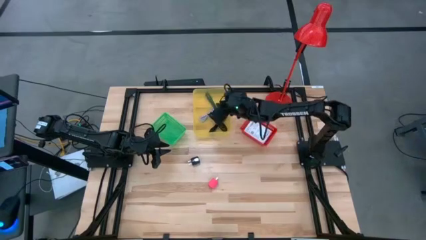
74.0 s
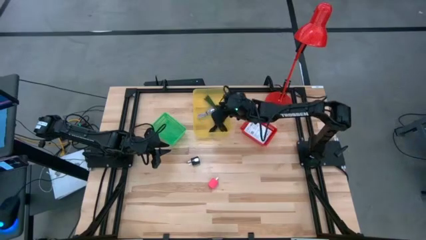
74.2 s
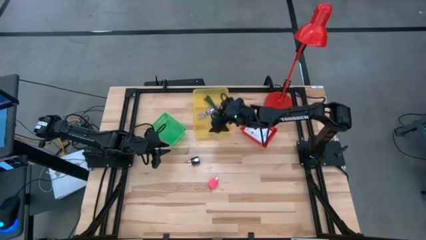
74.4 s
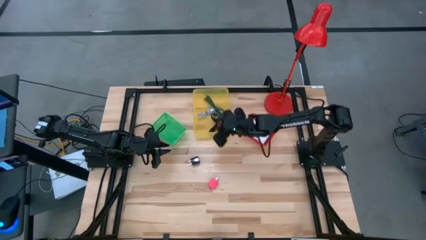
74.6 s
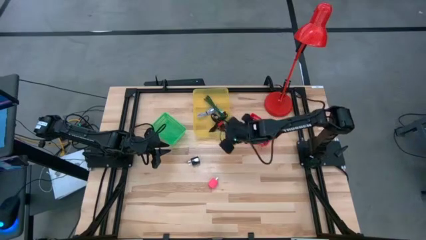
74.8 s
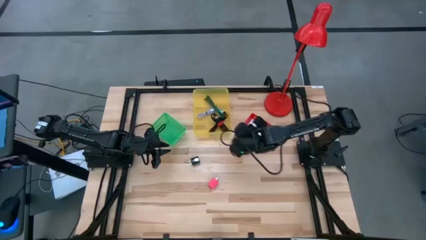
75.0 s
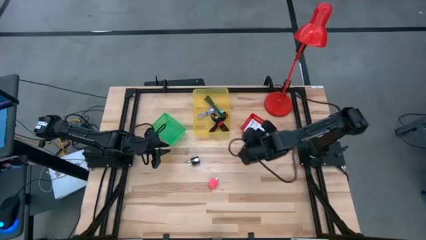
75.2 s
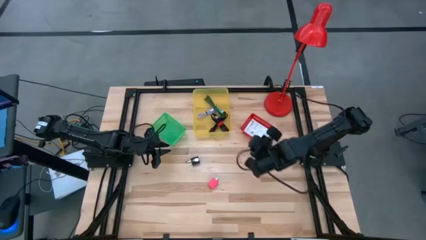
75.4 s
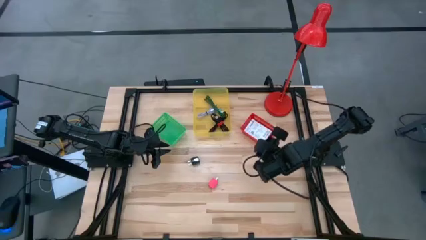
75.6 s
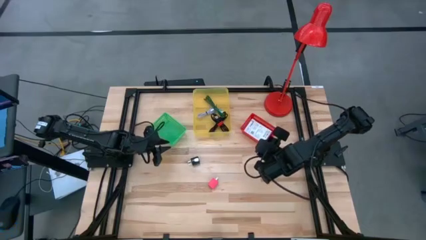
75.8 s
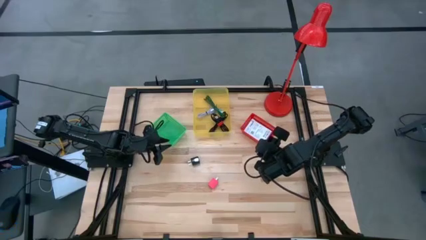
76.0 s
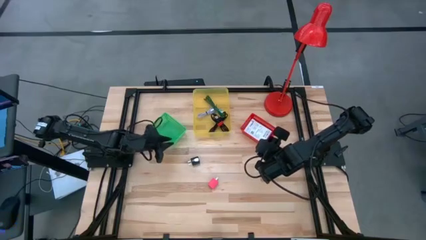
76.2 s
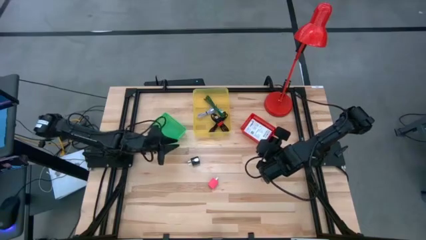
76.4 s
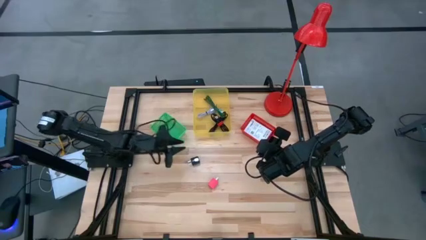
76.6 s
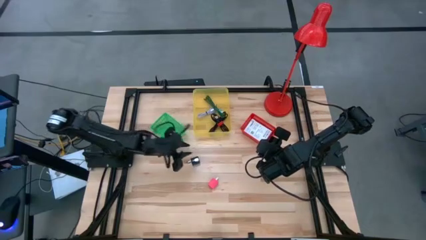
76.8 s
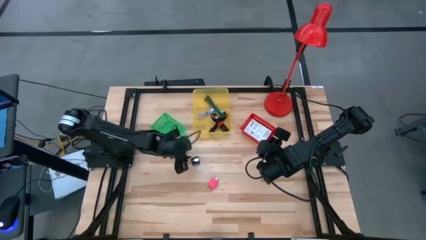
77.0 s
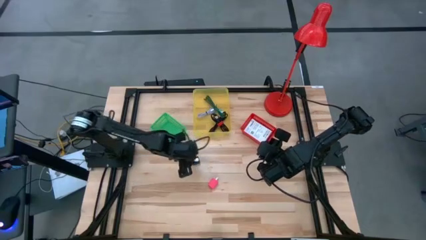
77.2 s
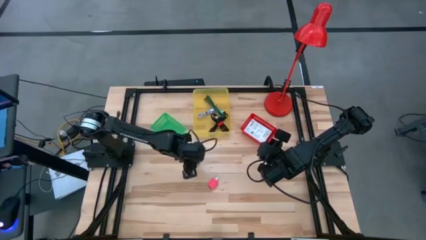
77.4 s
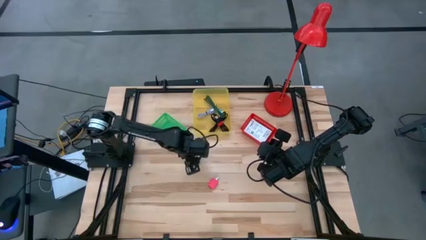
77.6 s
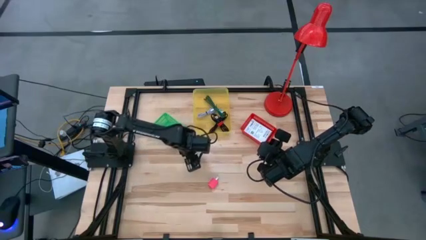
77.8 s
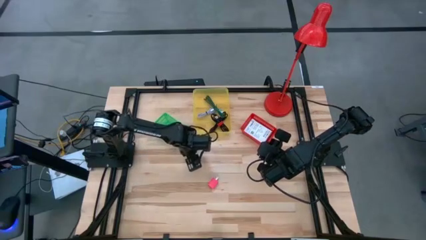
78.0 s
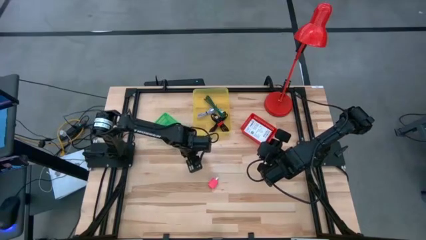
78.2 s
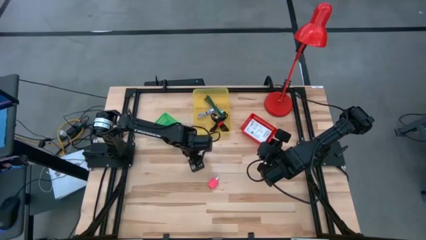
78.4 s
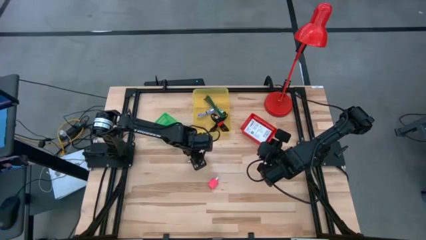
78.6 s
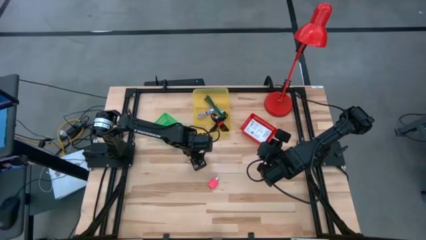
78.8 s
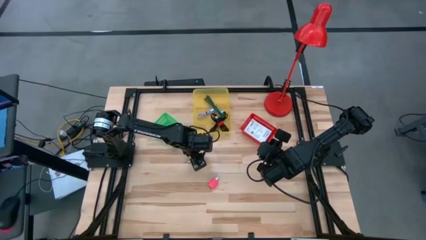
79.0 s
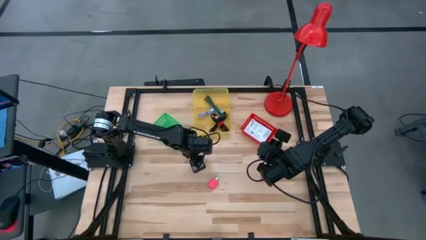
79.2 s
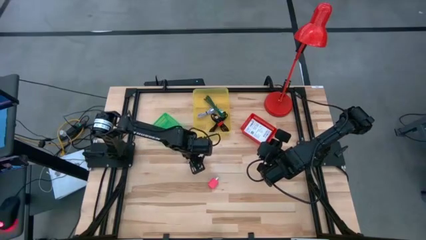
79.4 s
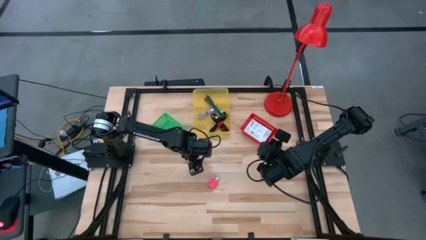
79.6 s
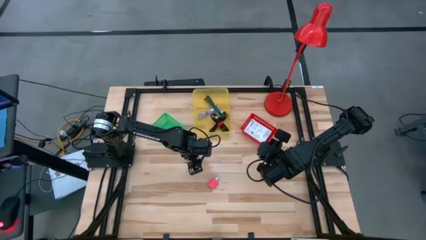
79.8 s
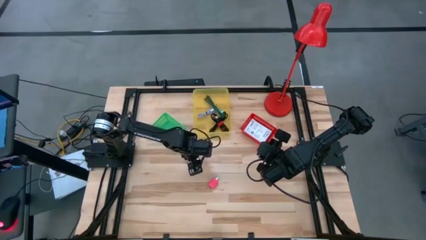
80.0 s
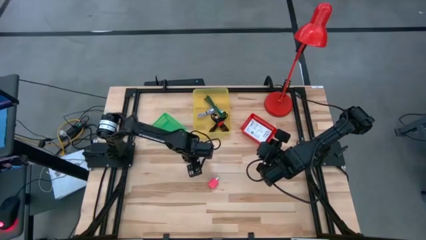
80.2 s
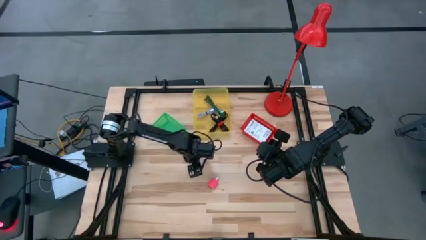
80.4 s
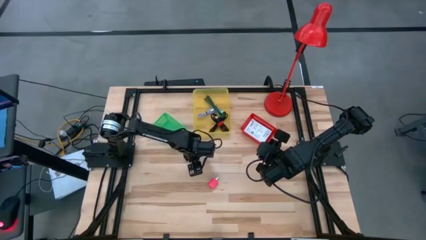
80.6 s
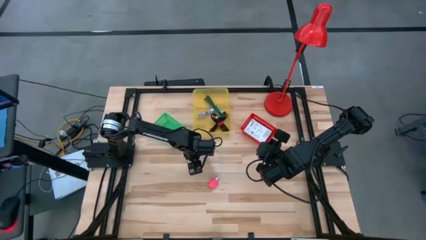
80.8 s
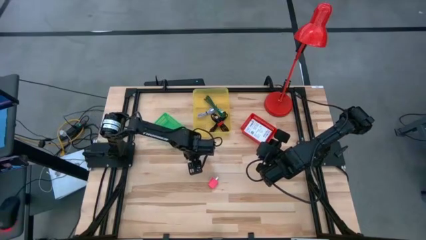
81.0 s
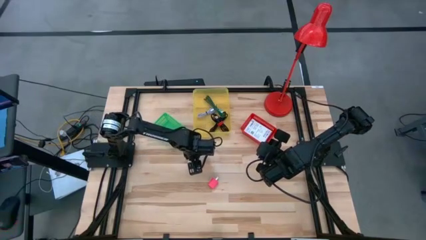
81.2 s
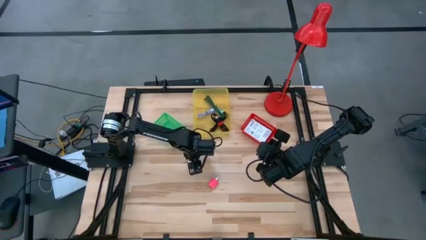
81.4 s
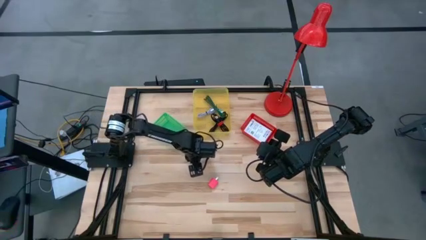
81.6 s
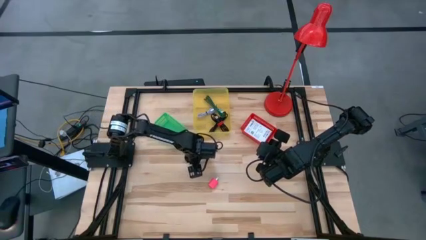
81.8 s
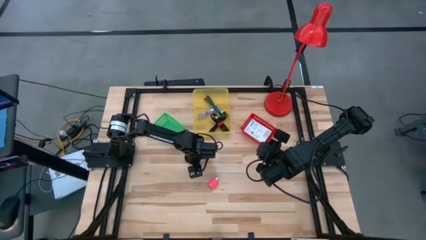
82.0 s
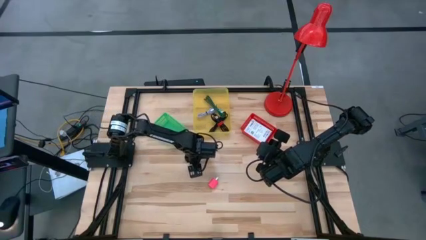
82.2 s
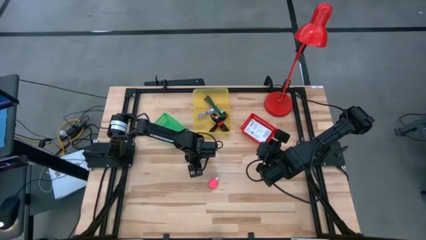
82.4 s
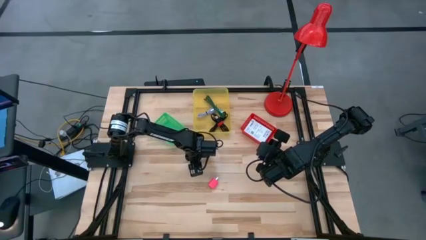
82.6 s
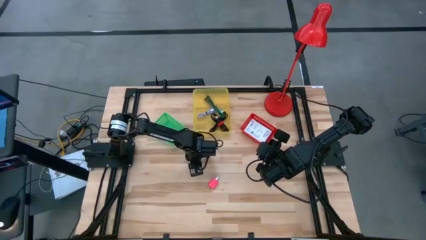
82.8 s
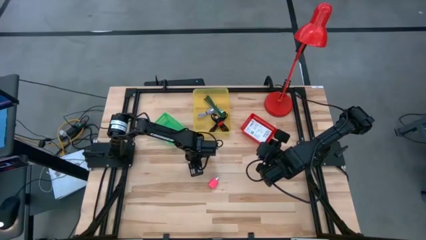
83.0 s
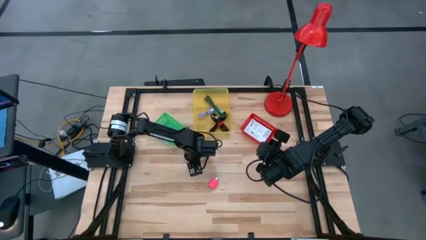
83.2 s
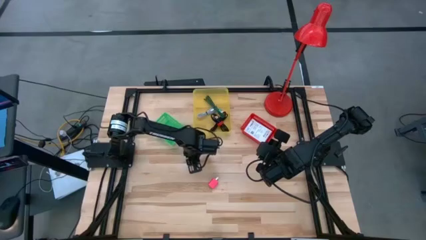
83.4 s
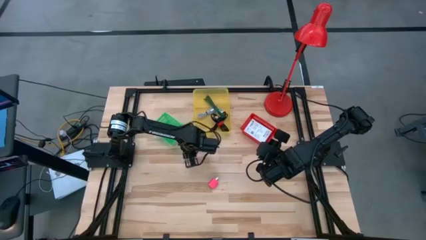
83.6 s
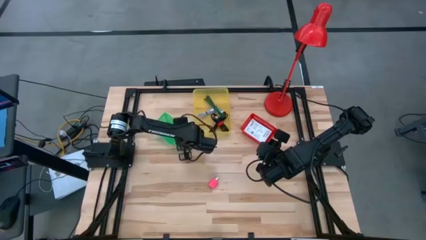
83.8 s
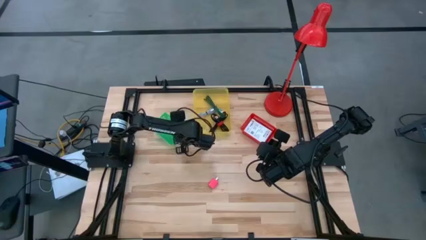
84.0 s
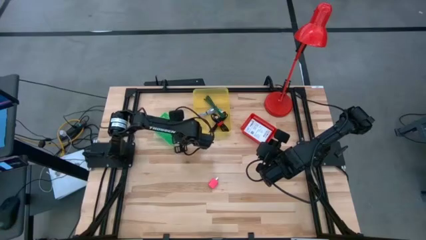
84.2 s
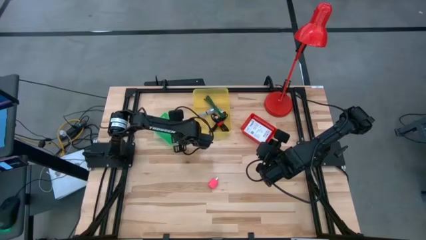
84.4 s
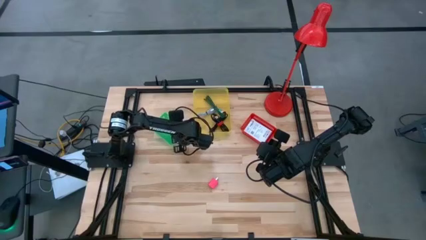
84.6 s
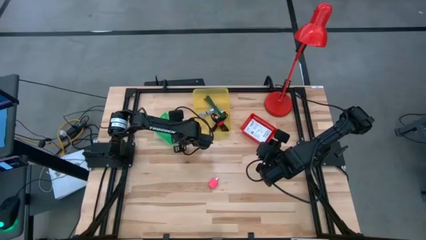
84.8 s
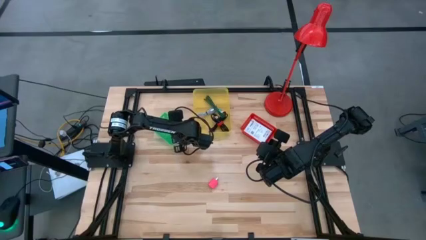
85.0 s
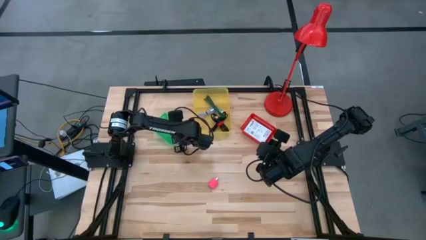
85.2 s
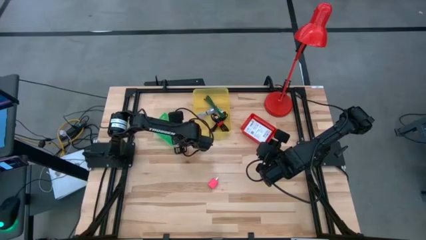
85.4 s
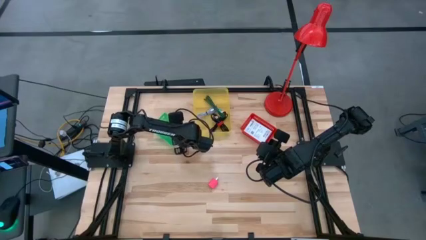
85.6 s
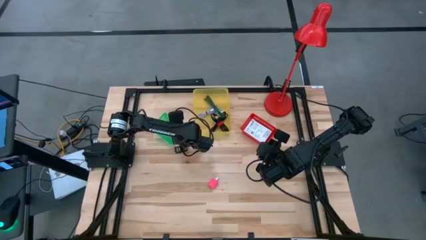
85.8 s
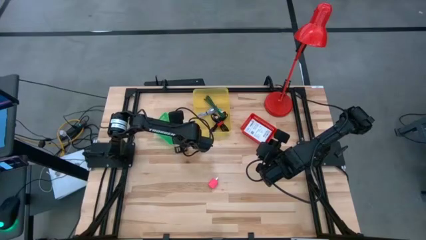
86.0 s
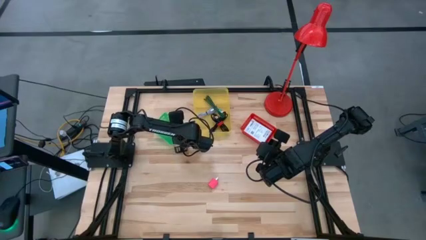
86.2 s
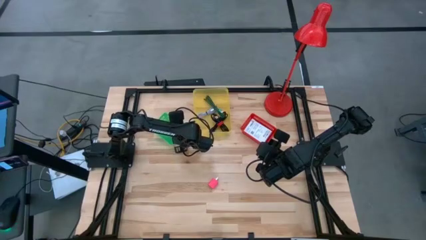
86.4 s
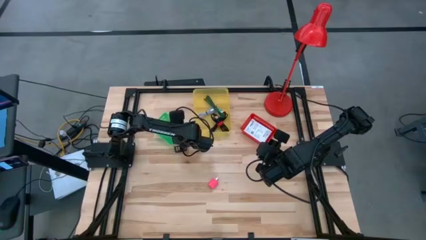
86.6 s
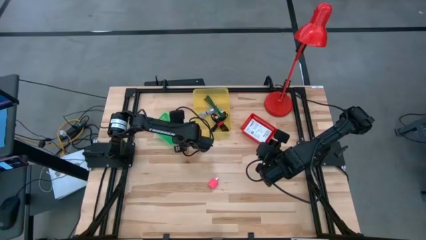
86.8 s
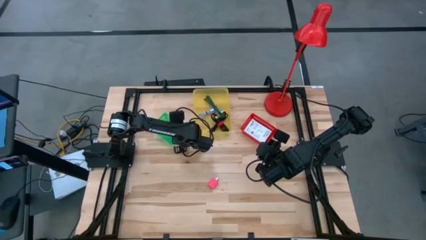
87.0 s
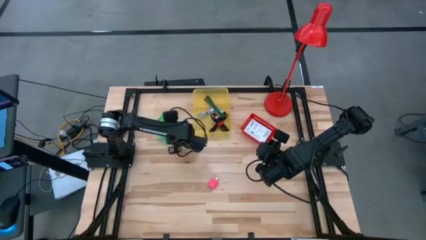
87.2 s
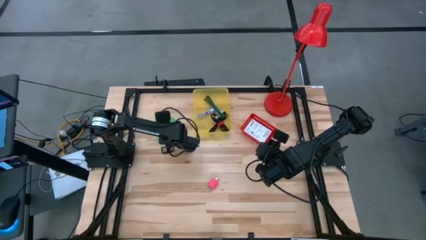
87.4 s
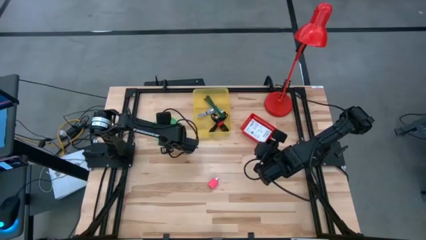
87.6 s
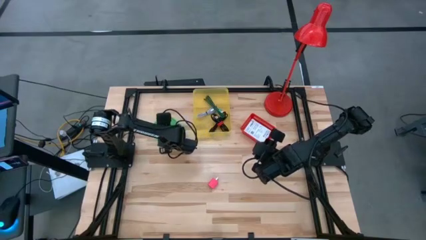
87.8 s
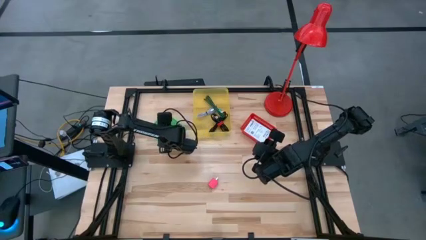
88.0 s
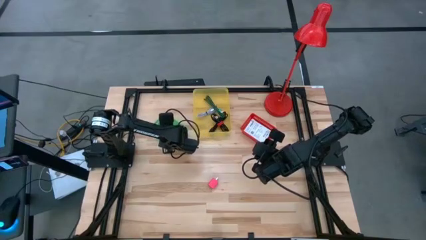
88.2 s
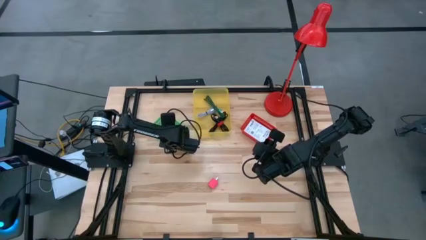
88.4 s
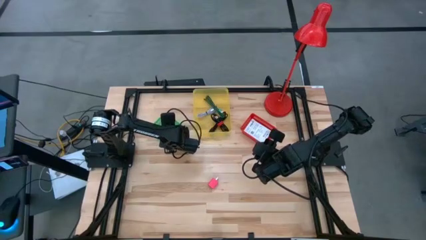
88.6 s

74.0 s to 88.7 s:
Task: Pick and place items into bin
Put the black charger adapter into the green bin

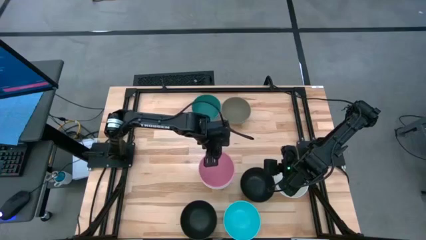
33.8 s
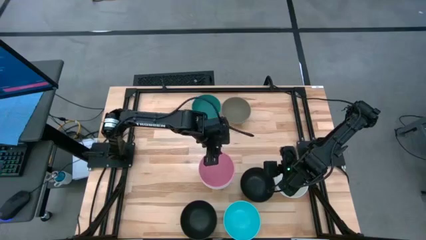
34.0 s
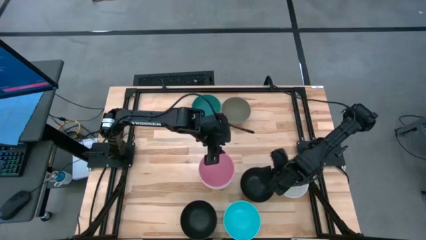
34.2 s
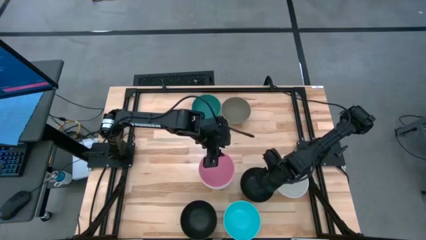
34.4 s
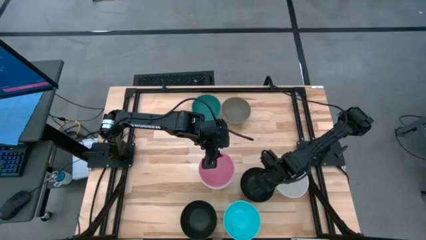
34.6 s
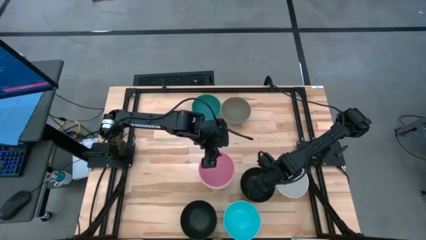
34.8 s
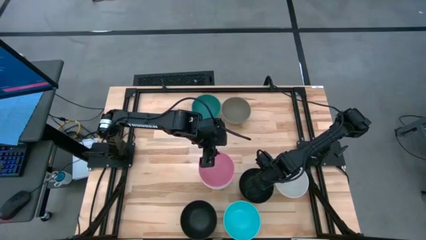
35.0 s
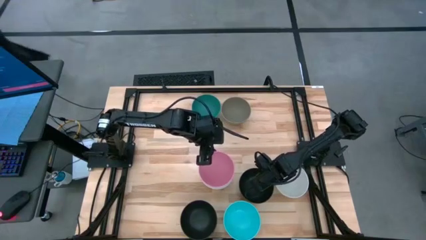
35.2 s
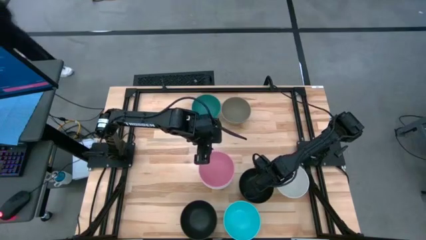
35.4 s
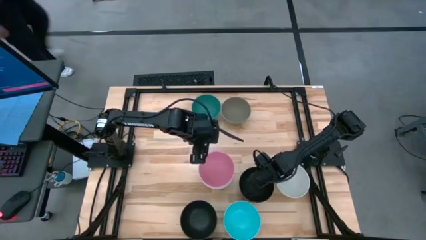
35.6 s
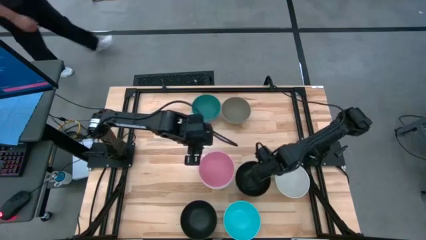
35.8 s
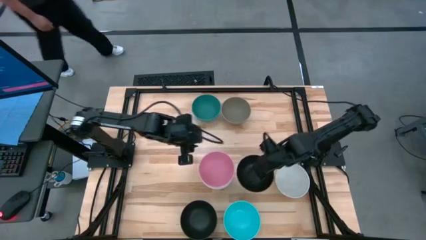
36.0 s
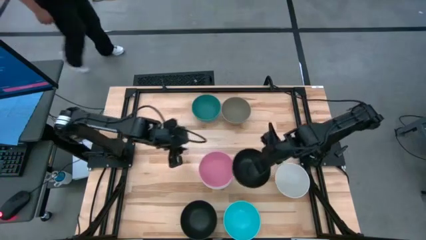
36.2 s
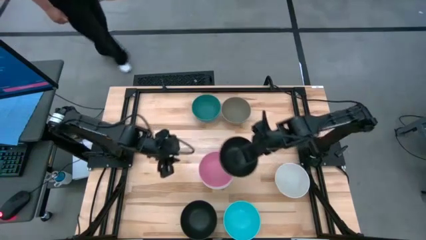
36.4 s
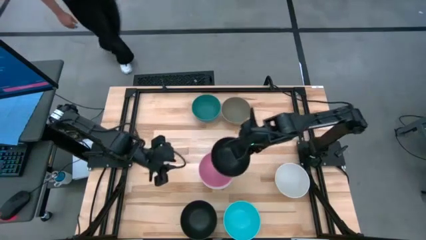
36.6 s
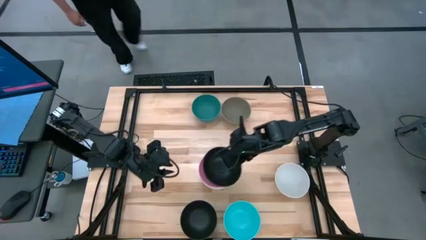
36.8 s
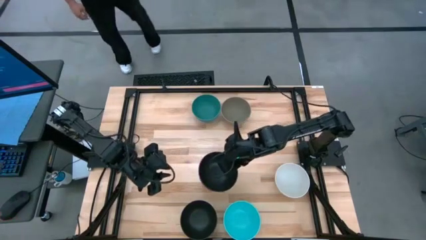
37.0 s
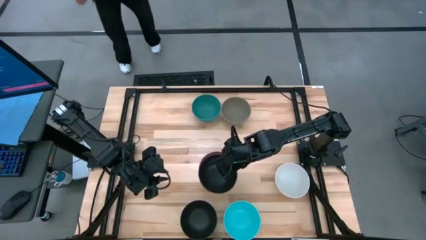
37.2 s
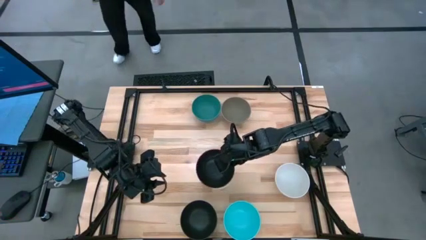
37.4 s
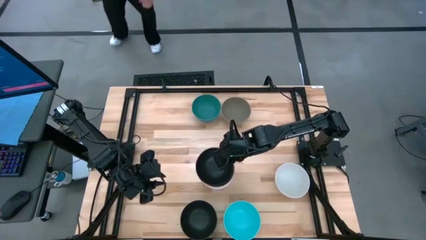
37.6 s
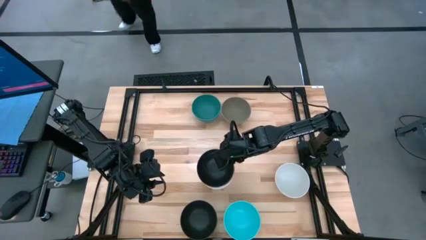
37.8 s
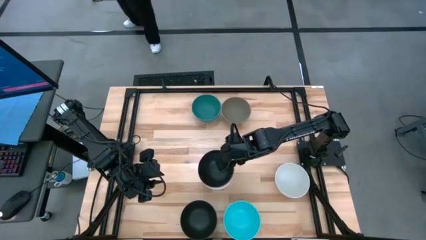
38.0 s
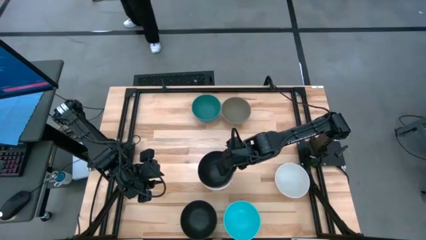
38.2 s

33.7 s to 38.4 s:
Task: Nest bowls inside each other
Stack the right black bowl on the top of the pink bowl
